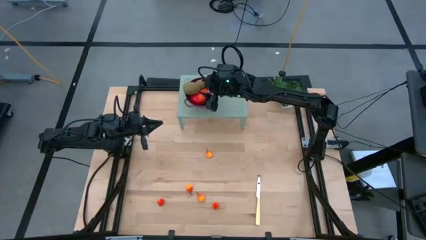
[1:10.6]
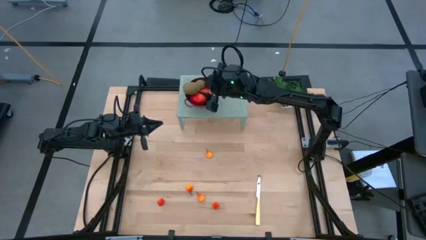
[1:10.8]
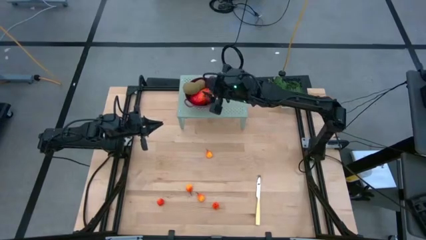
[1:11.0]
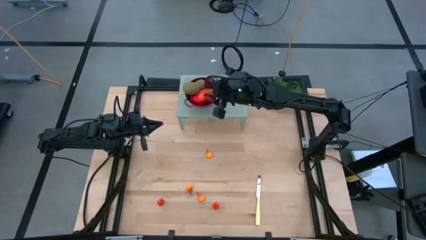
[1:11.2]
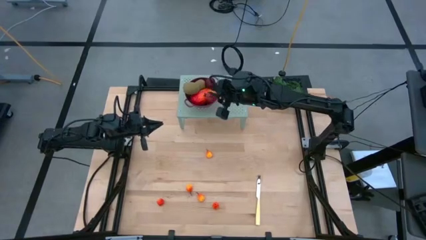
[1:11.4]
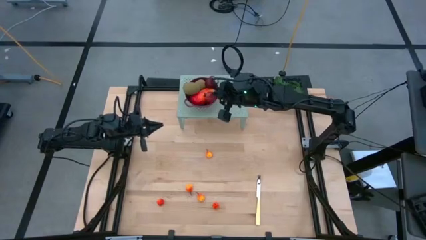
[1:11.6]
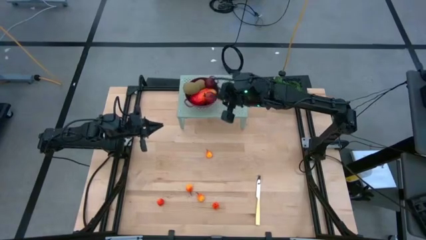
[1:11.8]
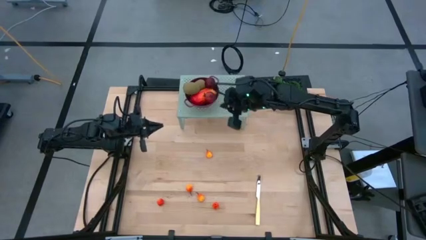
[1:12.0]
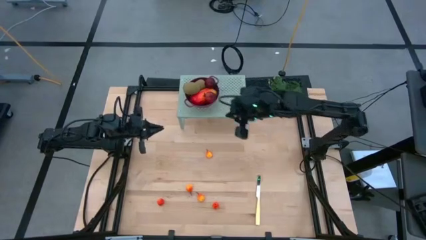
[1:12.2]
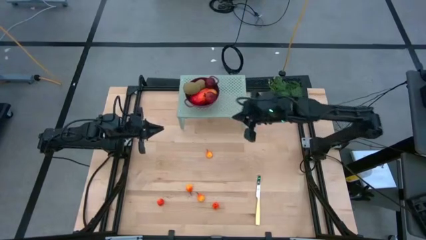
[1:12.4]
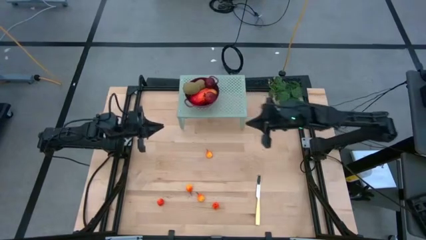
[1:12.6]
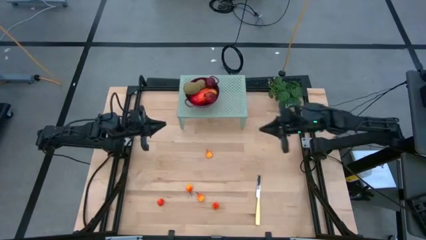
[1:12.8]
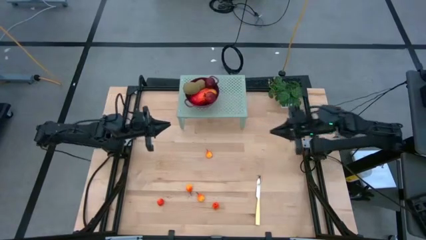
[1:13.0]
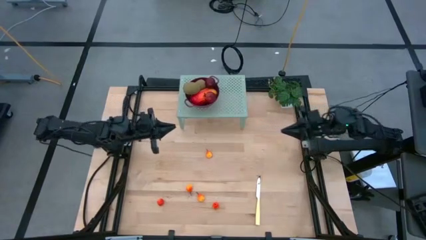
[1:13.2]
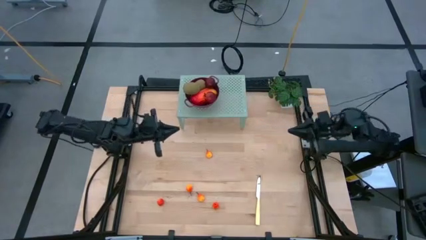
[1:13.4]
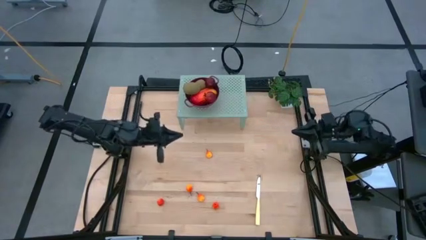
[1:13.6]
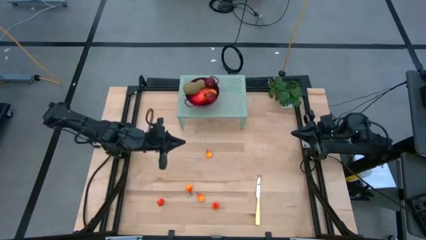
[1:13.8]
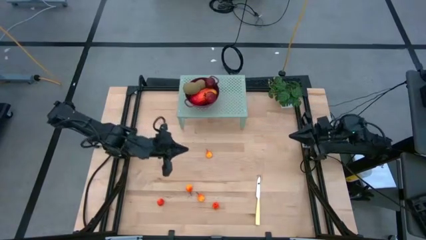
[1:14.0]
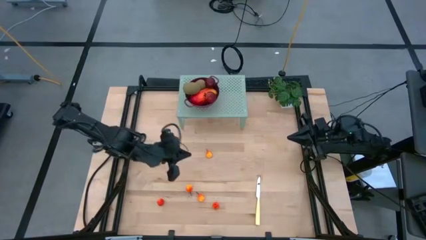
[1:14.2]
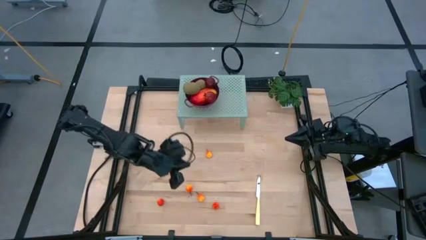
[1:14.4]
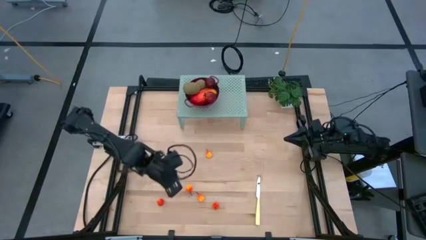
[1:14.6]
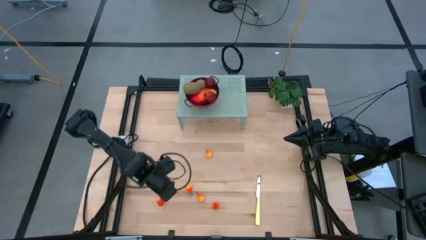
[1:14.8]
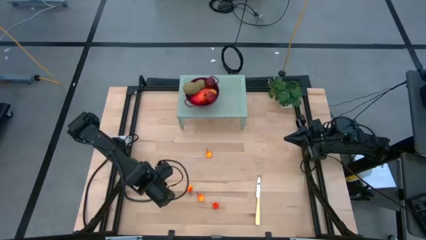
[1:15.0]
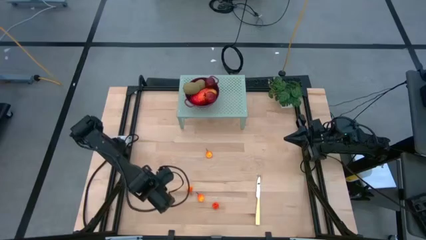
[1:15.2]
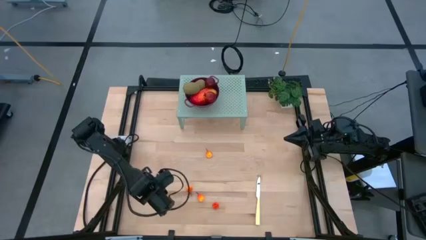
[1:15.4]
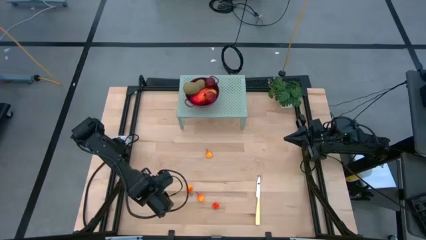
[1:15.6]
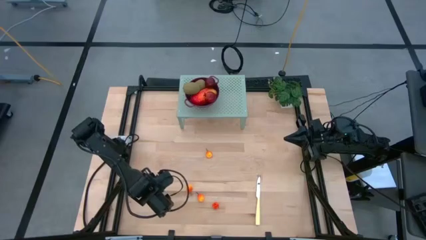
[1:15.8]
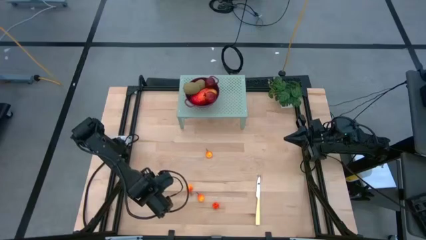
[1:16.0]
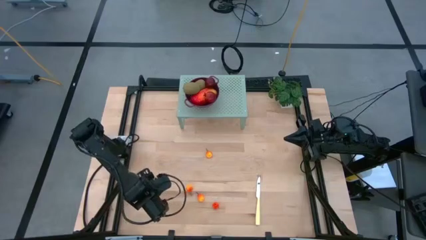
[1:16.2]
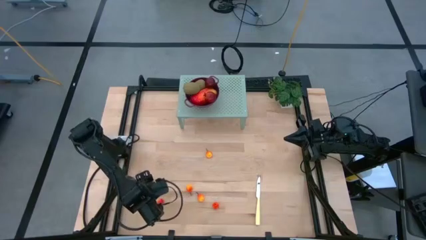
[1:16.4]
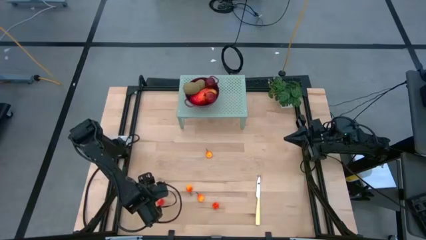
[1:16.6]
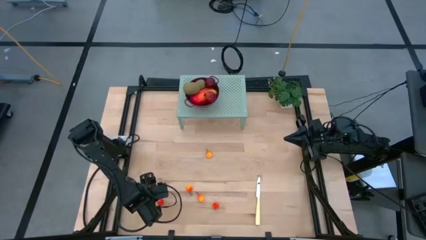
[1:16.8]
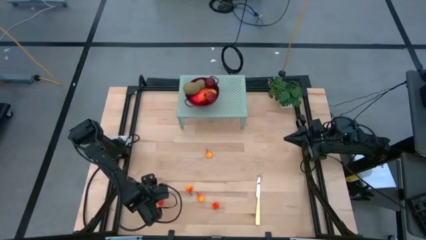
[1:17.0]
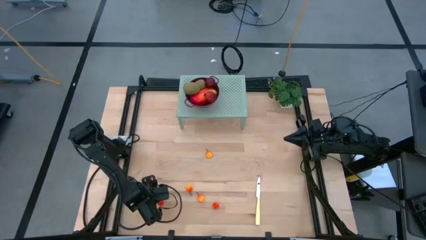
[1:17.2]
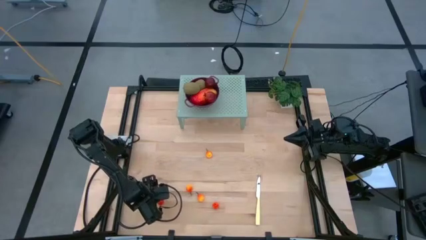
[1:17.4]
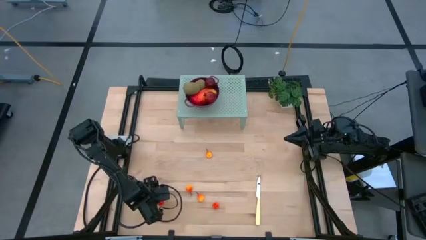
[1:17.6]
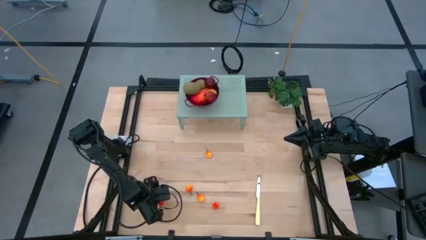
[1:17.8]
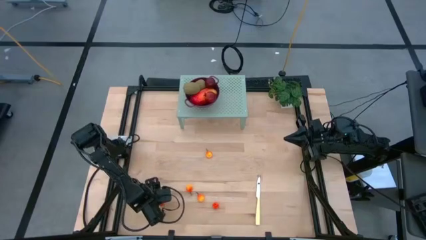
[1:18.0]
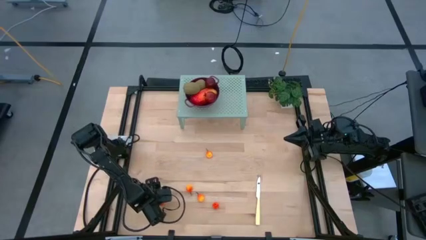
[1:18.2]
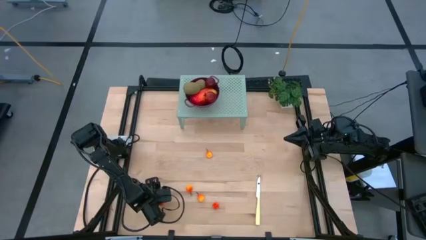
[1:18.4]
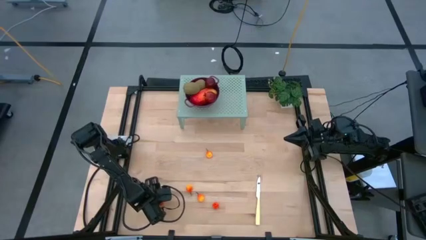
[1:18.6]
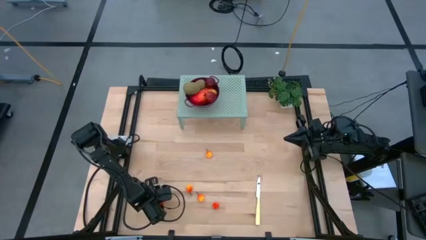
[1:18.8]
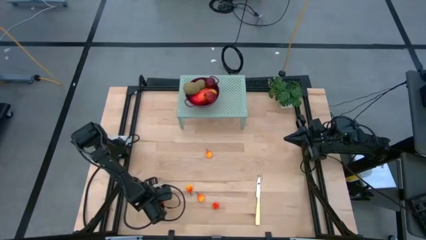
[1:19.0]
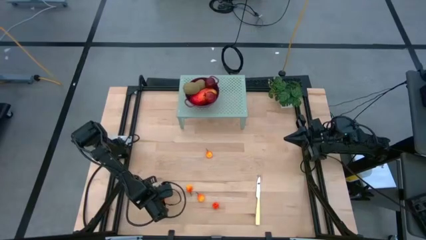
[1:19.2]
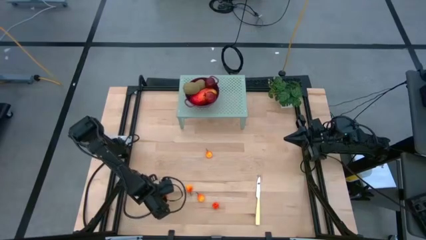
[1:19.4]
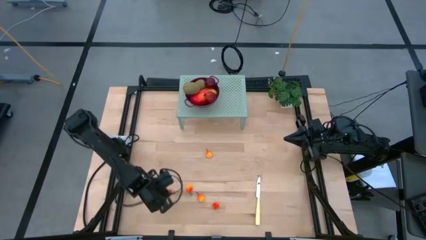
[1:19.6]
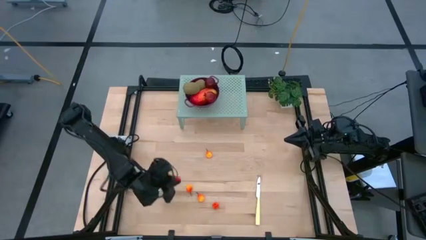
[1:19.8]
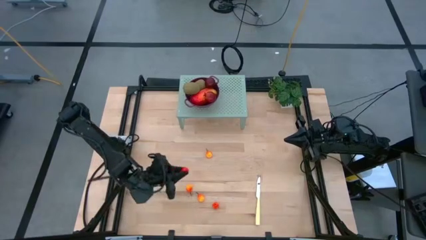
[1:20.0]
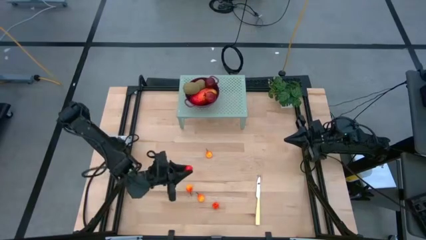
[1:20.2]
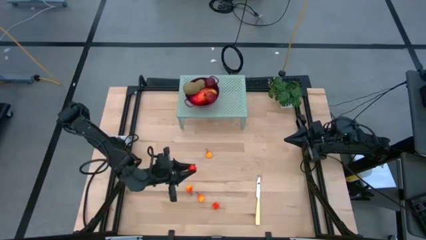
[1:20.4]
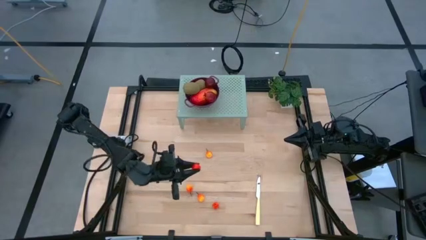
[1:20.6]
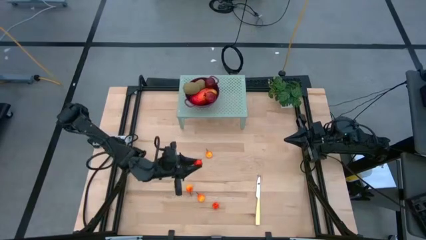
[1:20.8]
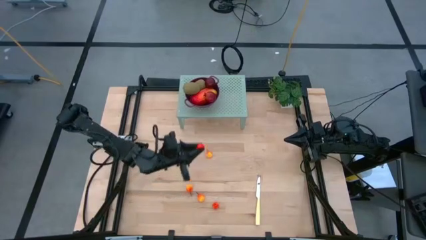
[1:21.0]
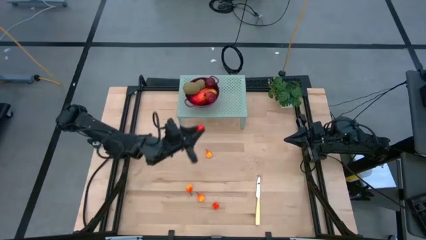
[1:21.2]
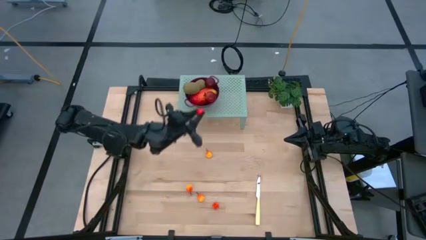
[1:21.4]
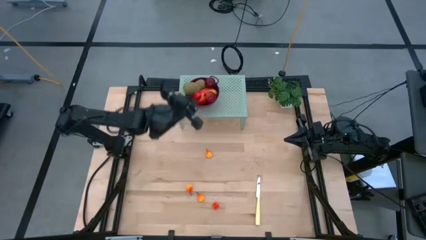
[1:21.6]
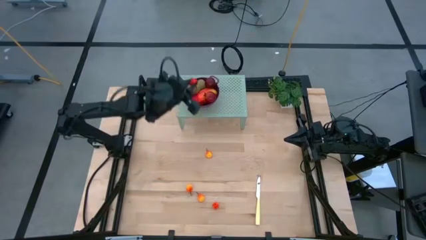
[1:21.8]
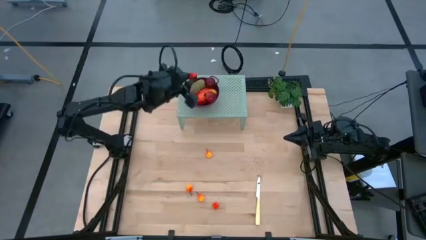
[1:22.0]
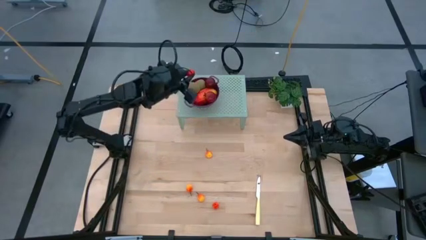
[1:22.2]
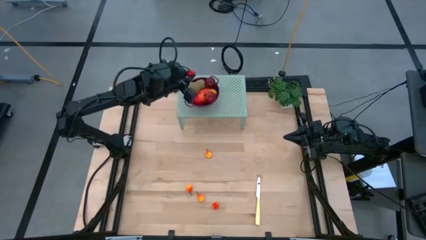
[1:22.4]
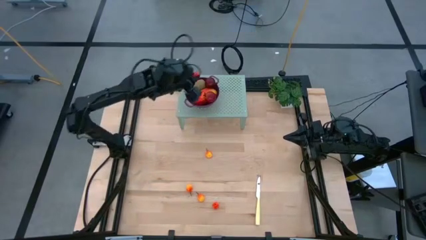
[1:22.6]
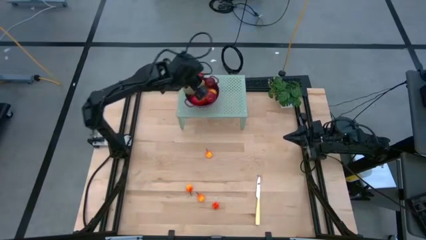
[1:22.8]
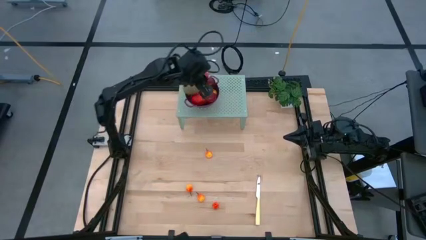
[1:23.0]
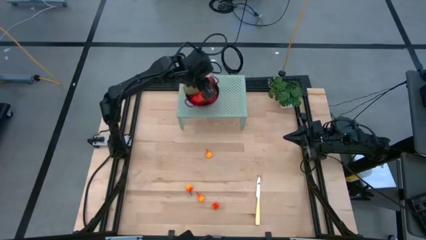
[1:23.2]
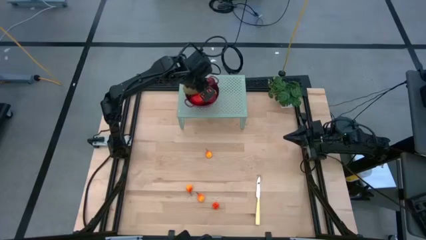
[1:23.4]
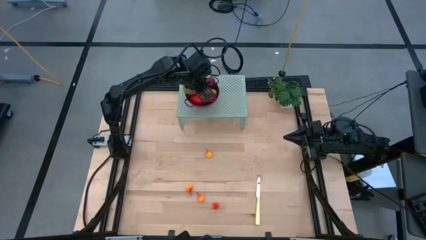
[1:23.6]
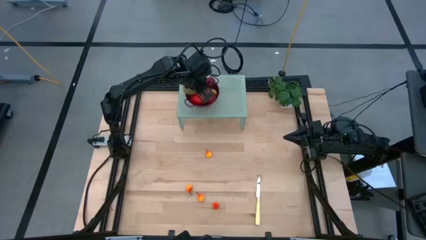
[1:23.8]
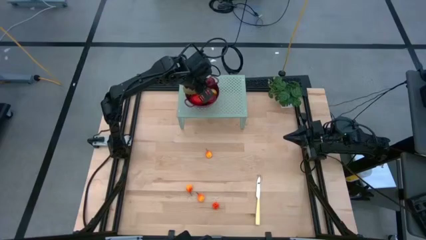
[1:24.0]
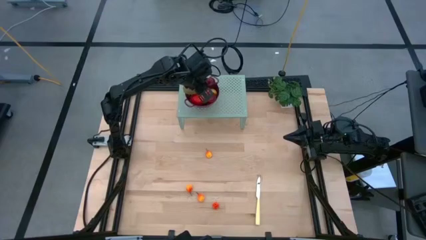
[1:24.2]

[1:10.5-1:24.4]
Task: Pick & Place Fruit
Put the orange peach in the red strainer bowl on the shelf

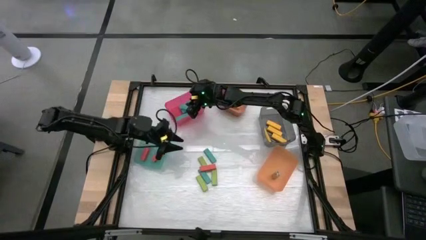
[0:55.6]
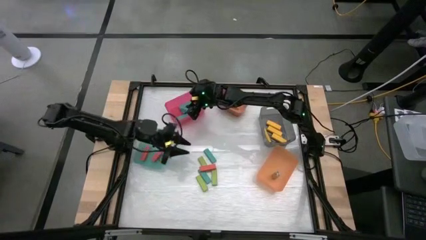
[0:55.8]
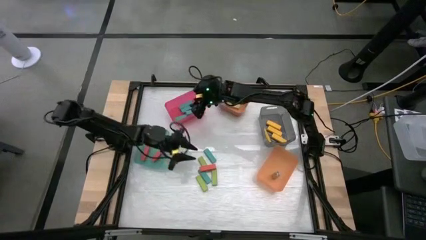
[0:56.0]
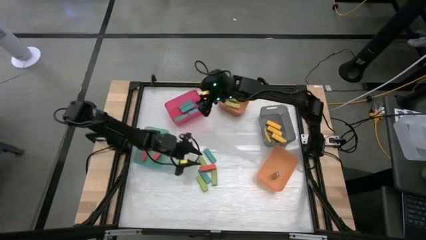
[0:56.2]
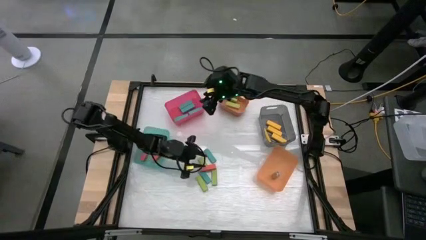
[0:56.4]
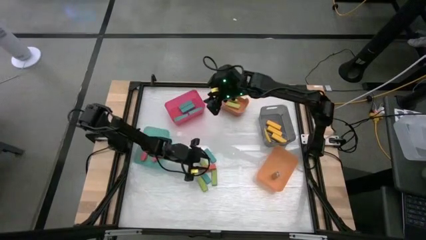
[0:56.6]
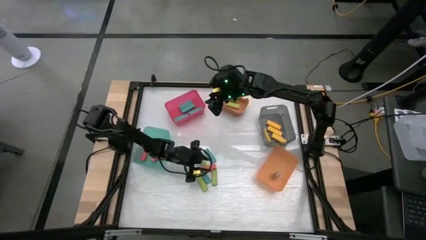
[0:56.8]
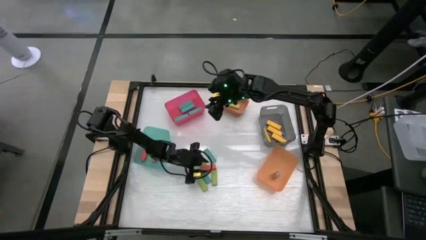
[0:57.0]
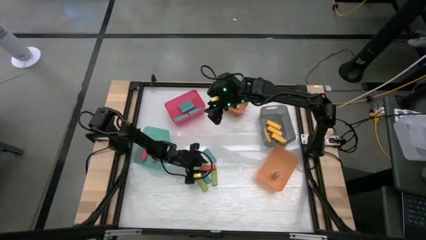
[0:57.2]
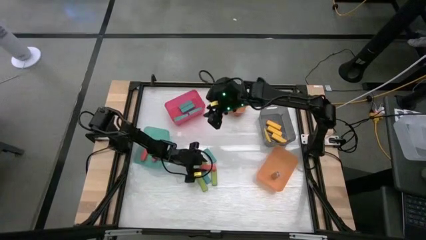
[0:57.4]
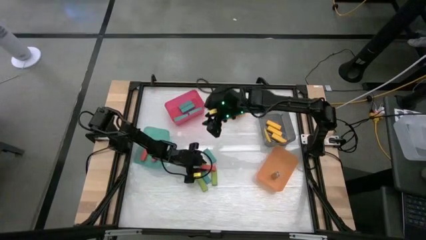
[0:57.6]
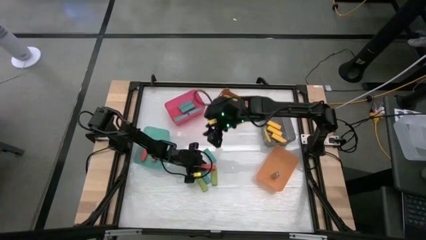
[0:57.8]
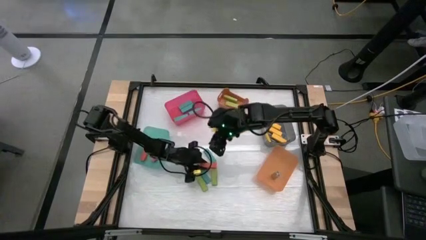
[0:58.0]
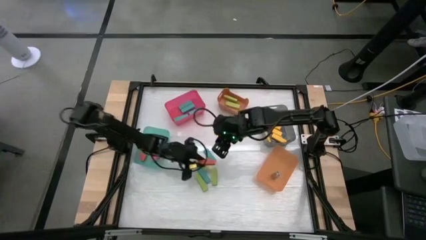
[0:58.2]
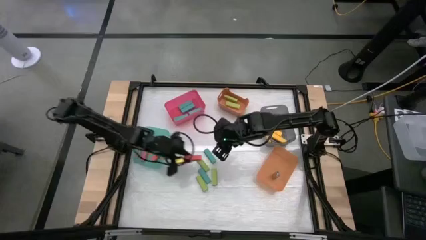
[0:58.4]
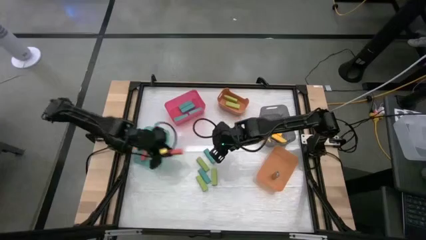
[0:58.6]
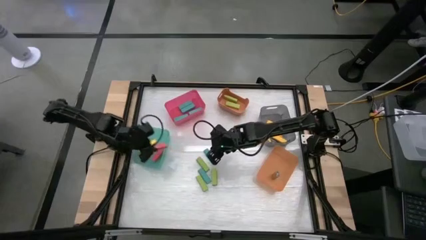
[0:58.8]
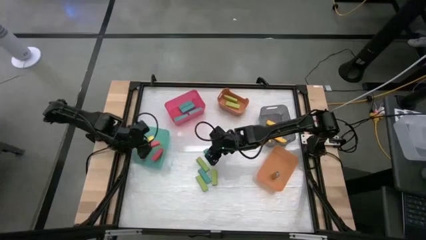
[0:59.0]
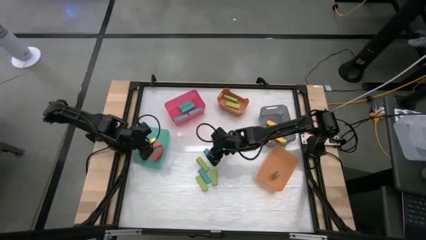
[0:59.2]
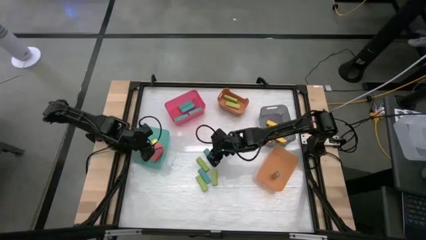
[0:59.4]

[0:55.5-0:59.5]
Task: Sort blocks
Put the orange block into the blue bin
